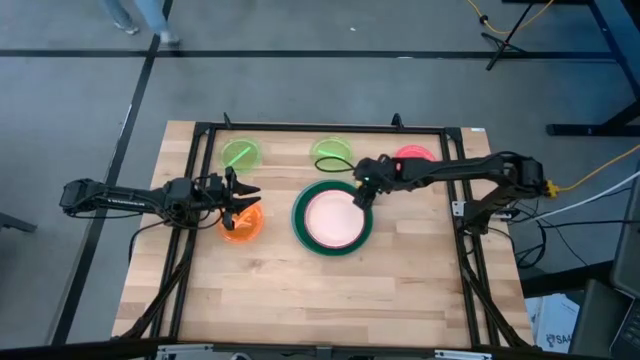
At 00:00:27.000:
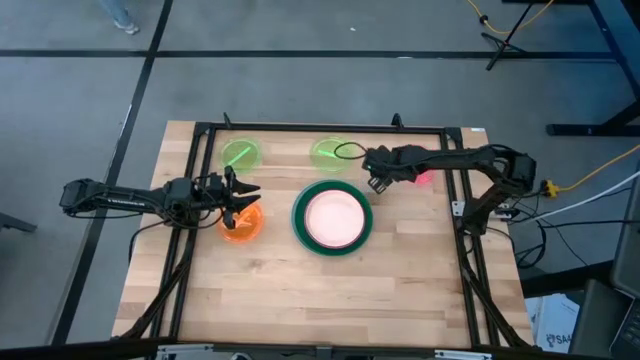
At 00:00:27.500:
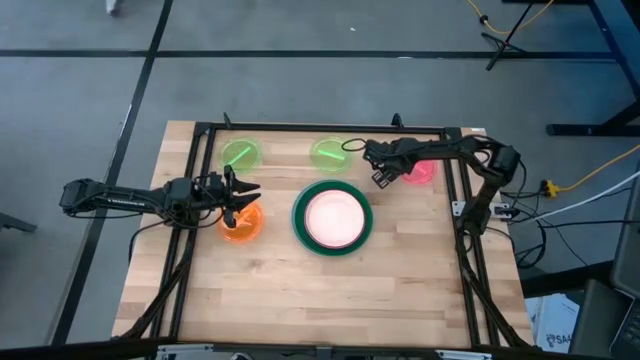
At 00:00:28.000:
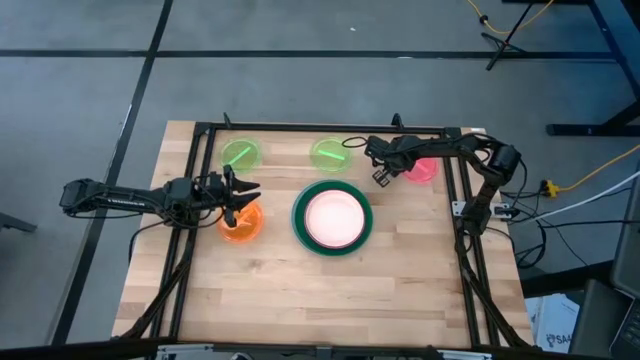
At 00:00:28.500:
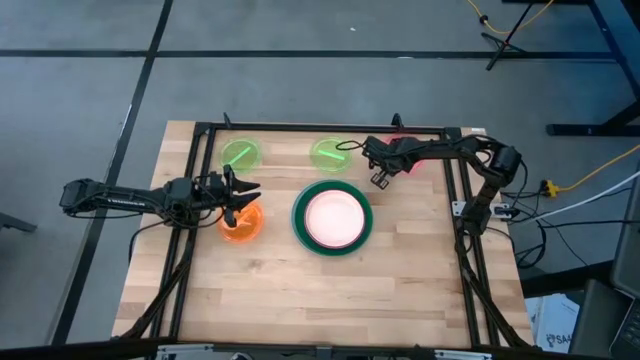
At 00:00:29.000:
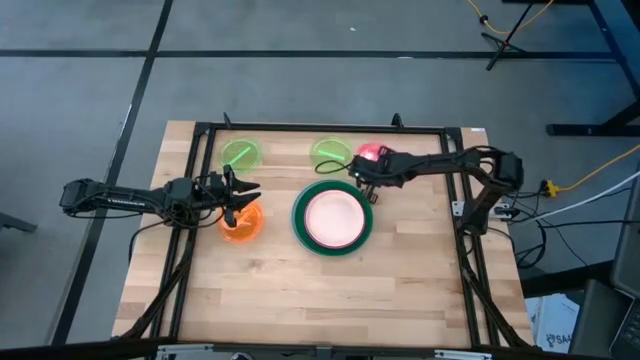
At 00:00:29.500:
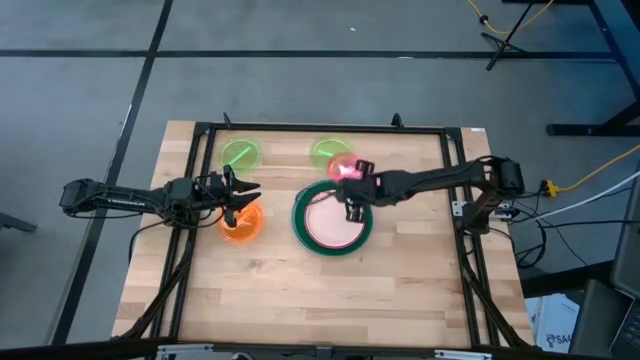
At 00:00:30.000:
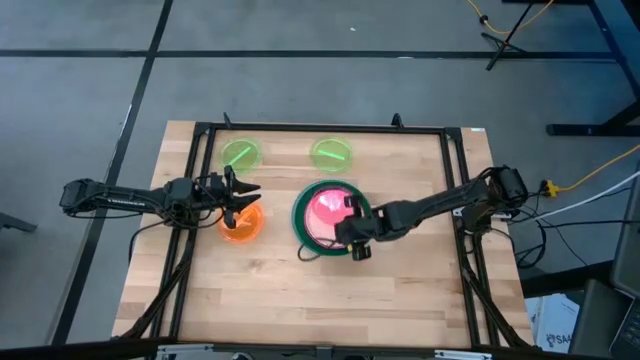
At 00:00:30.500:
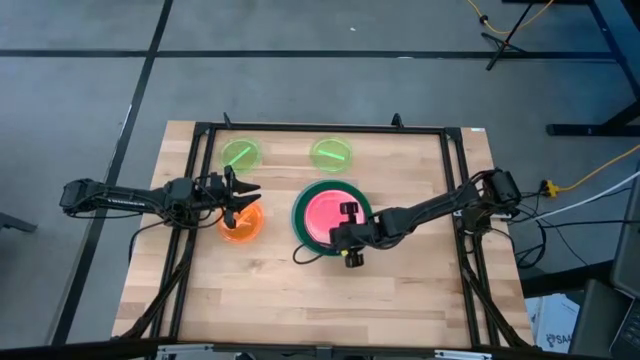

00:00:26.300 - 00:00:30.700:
Task: Stack plastic plates
Stack the light pink plate on the white plate

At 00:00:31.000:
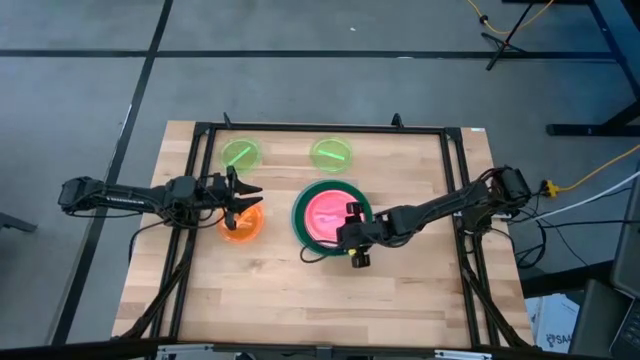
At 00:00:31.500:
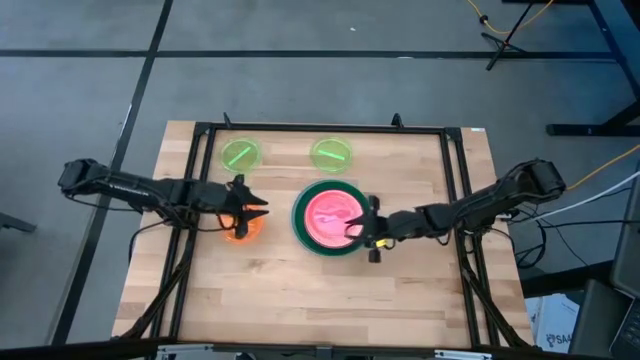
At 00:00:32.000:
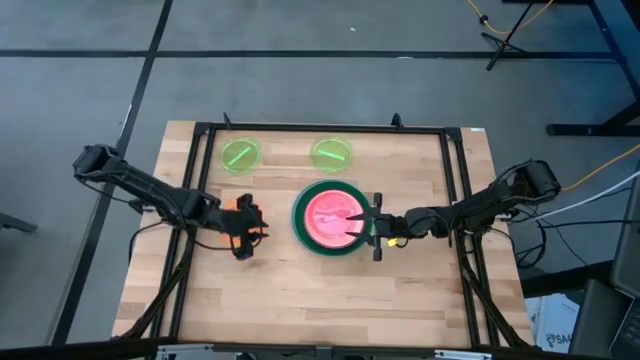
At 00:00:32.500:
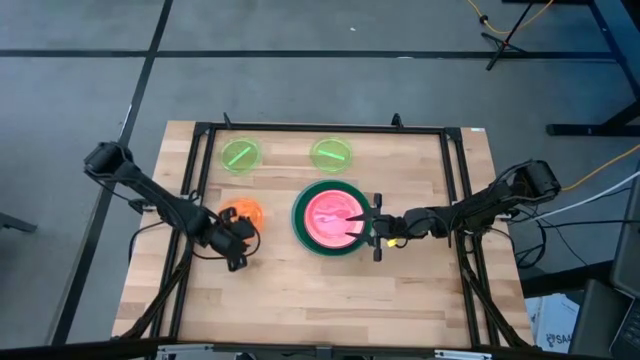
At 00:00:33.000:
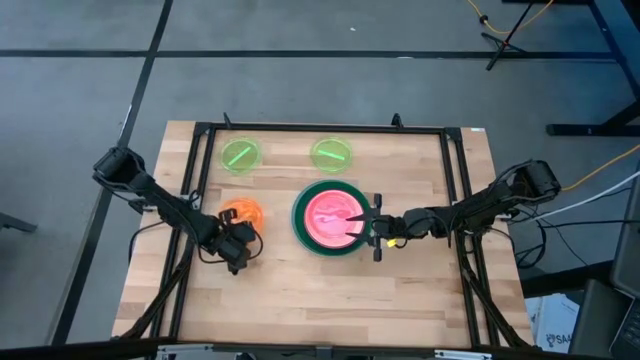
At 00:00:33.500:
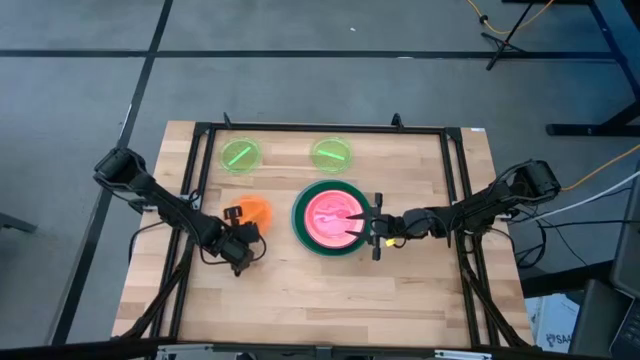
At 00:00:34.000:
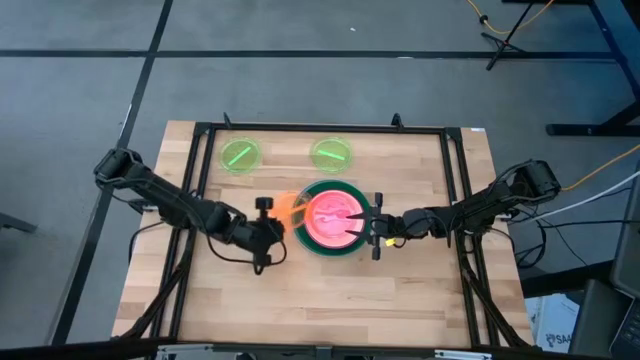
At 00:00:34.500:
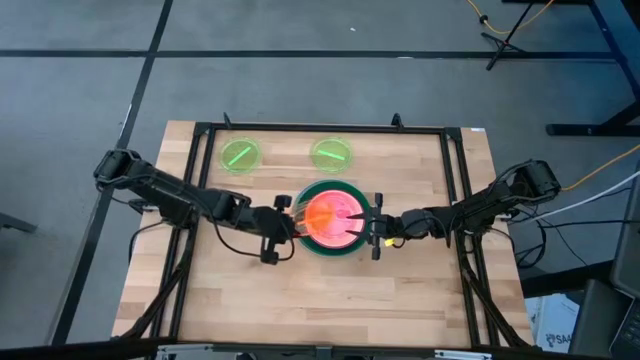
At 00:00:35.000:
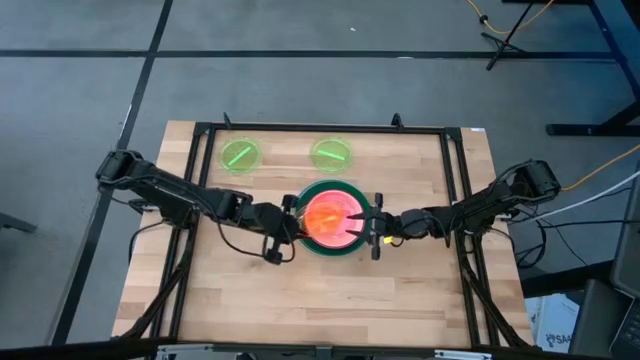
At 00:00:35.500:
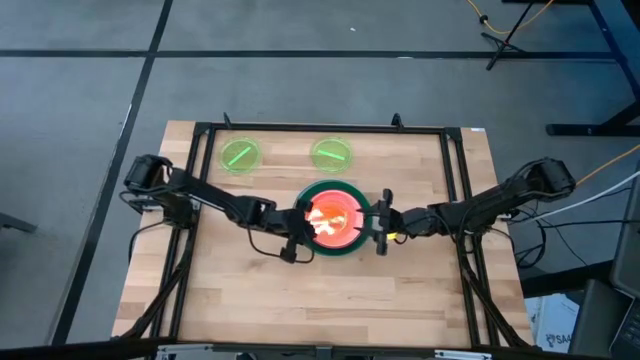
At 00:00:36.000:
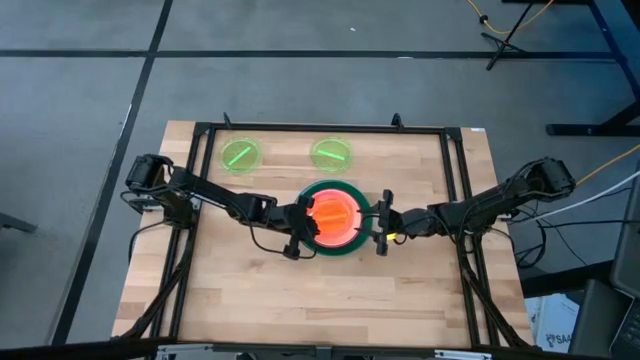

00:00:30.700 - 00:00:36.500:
Stack the orange plate on the light pink plate

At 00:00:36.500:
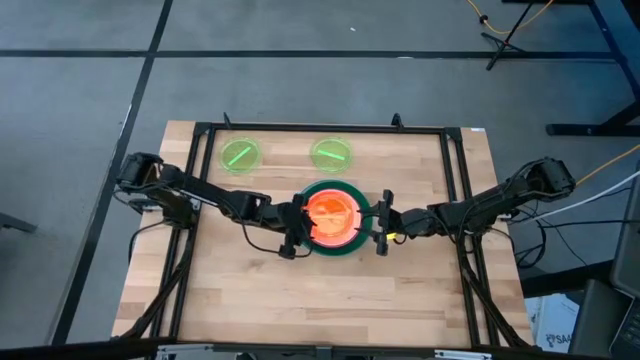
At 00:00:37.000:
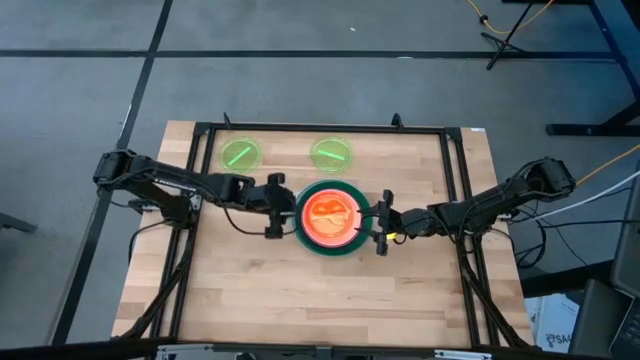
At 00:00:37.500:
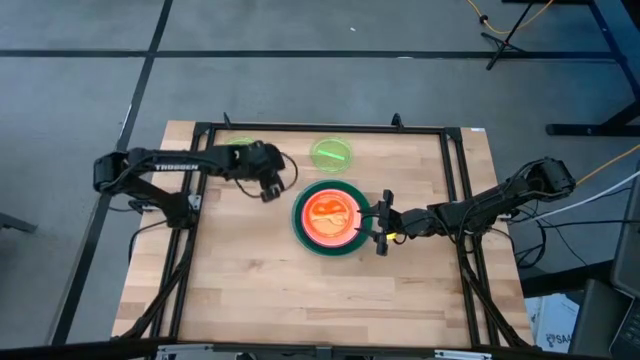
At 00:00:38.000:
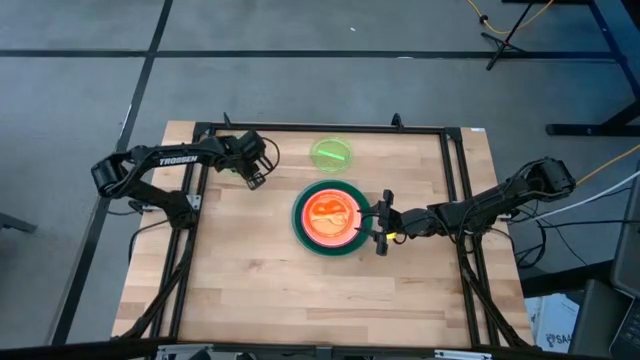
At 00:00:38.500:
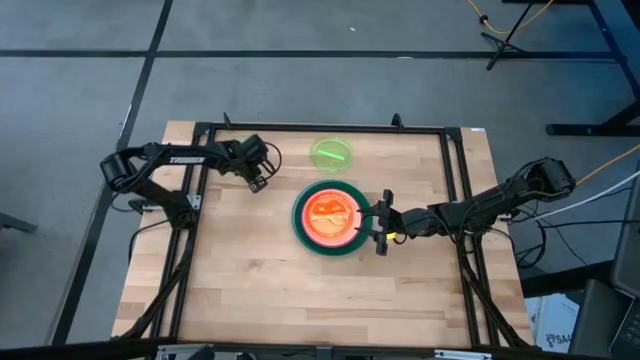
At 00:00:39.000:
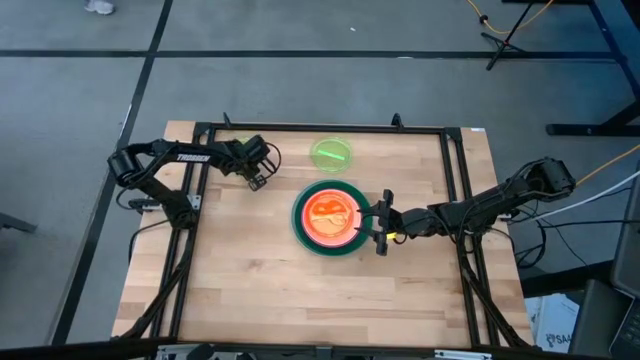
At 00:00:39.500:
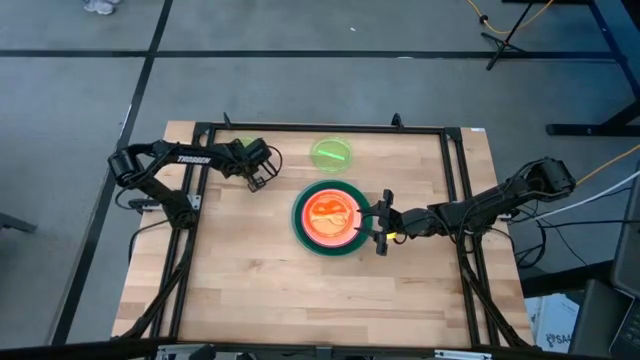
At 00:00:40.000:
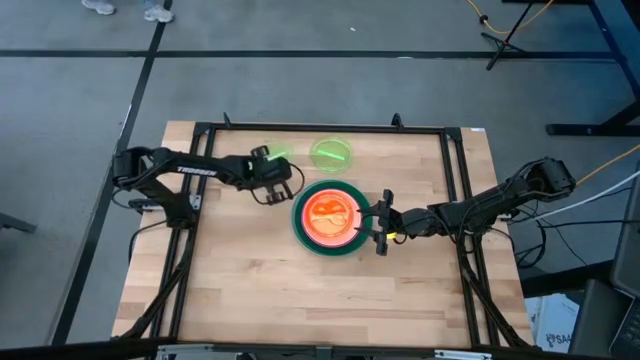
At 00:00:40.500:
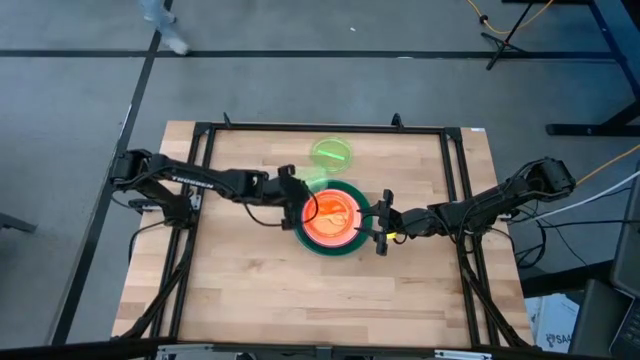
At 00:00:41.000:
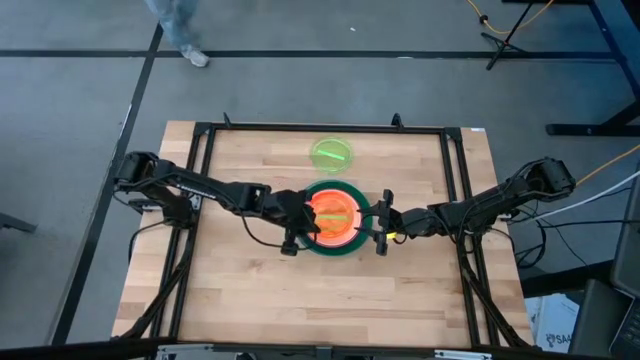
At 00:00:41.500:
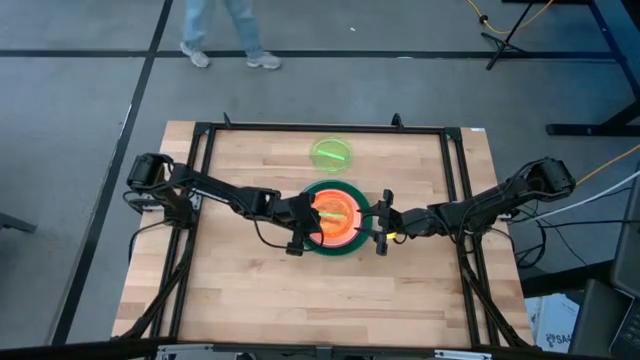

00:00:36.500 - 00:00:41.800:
Stack the left green plate on the orange plate

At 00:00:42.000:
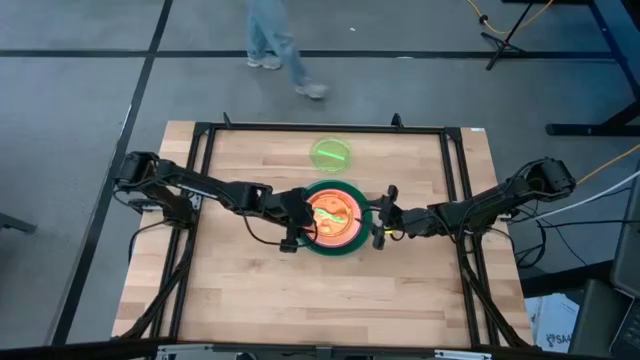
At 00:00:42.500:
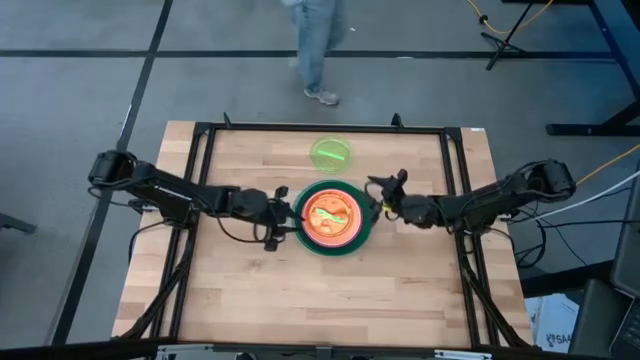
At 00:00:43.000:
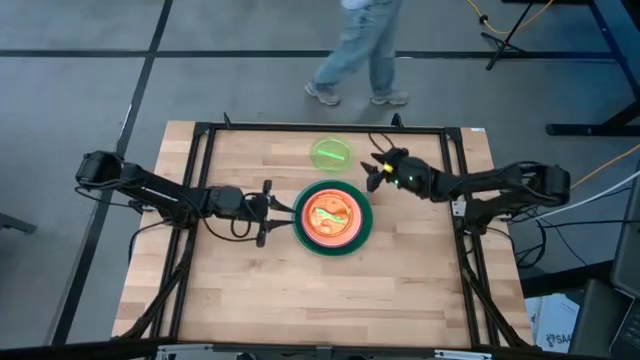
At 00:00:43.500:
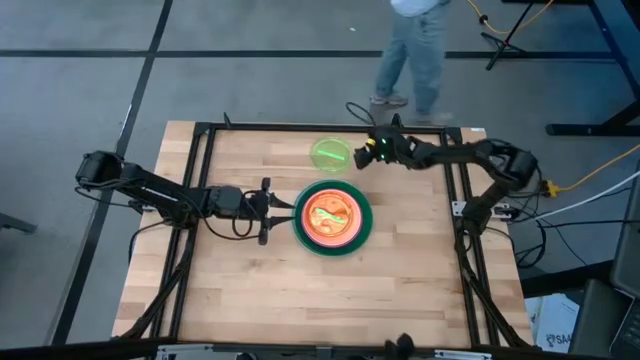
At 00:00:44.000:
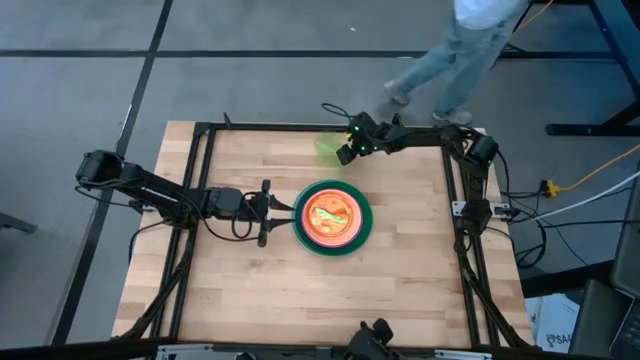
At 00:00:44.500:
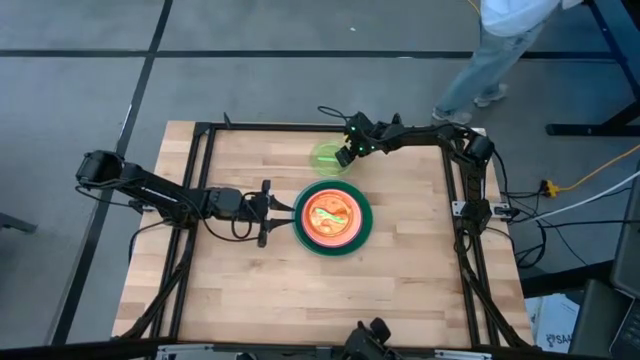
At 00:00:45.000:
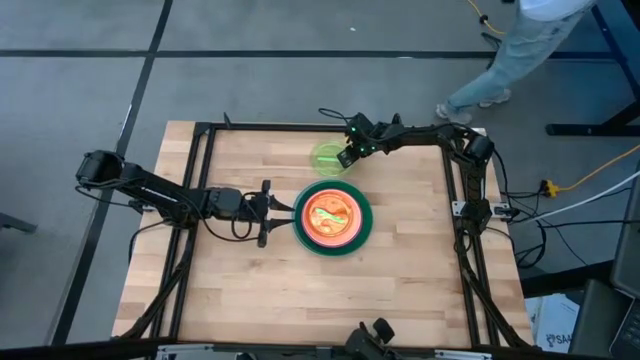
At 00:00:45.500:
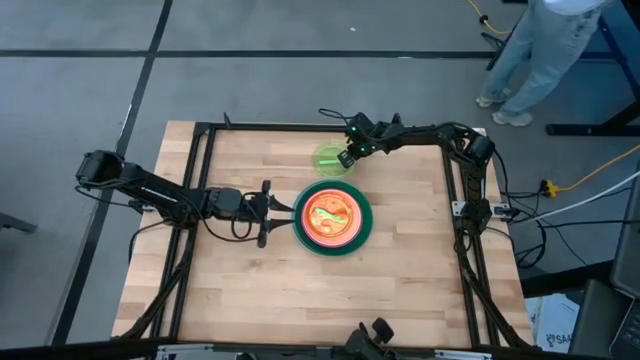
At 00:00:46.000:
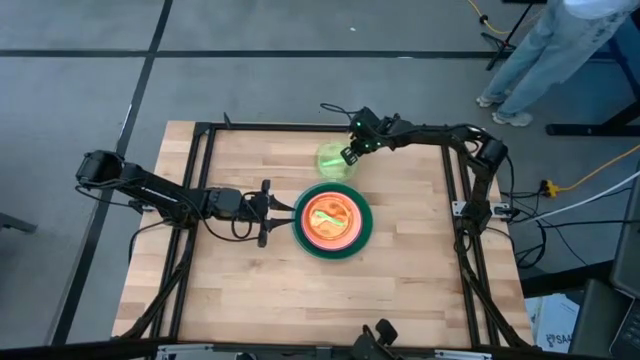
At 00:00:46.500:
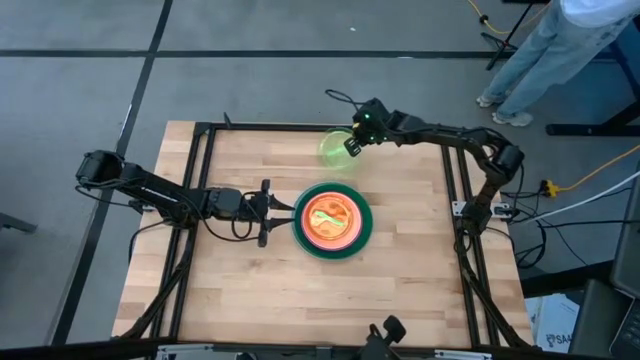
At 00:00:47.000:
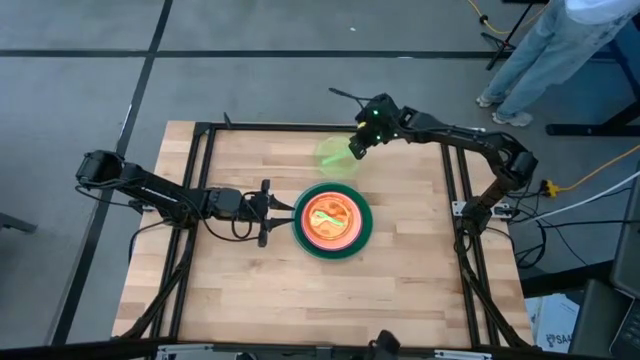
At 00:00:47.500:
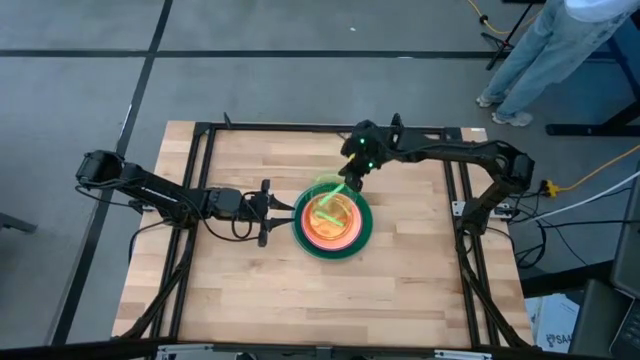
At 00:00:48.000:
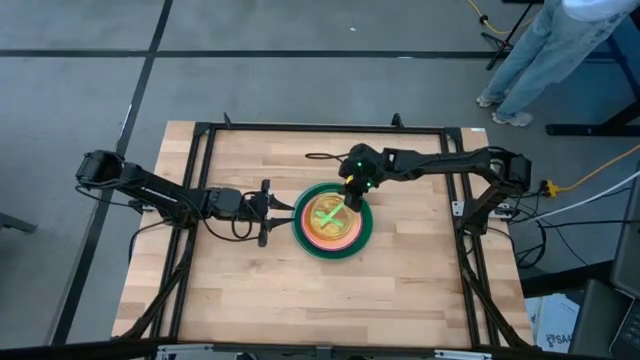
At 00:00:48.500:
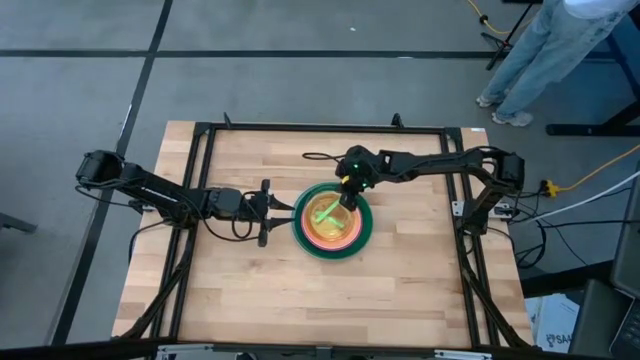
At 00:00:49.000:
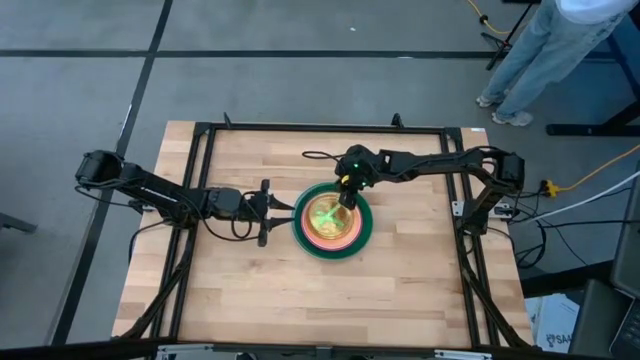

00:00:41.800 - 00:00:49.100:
Stack the green plate on the green plate
